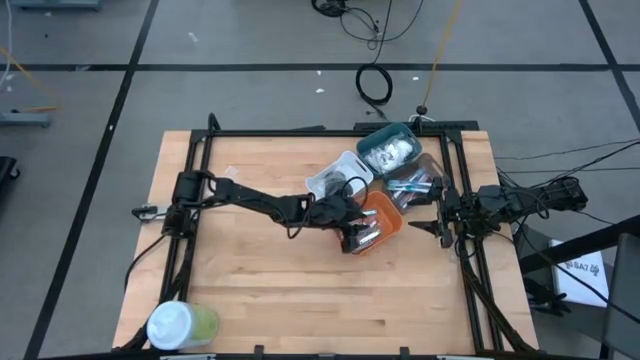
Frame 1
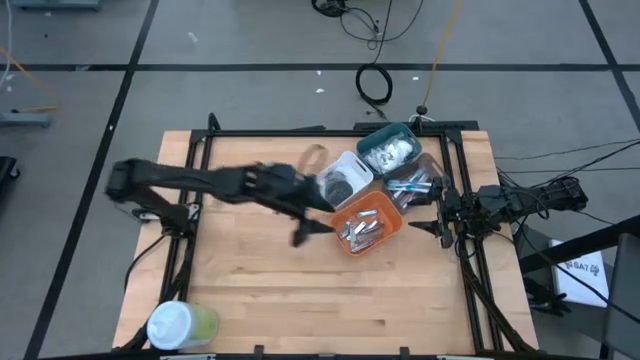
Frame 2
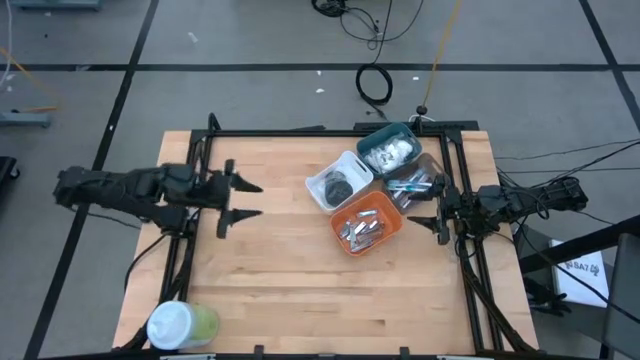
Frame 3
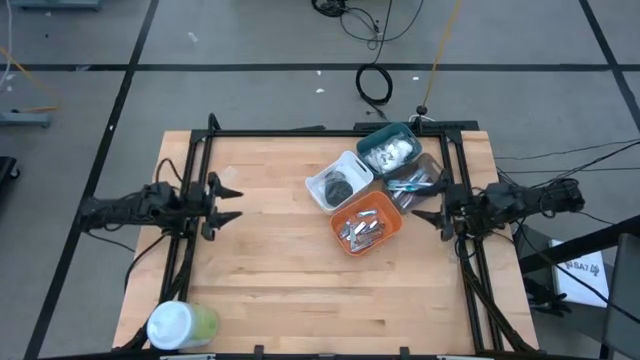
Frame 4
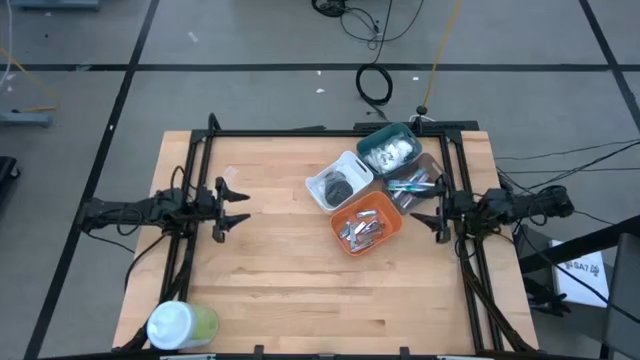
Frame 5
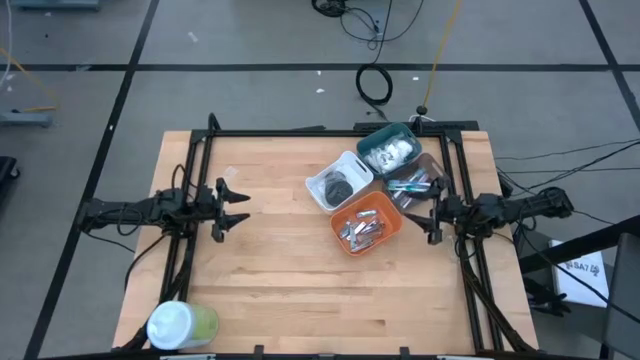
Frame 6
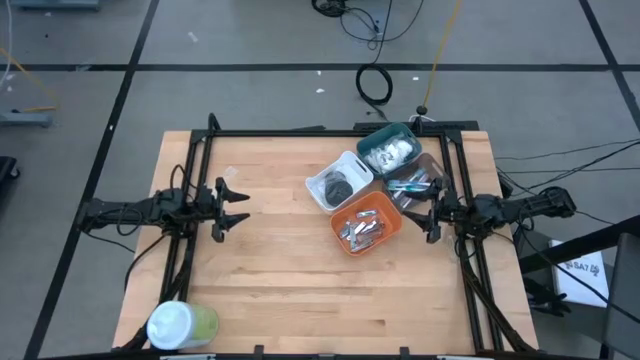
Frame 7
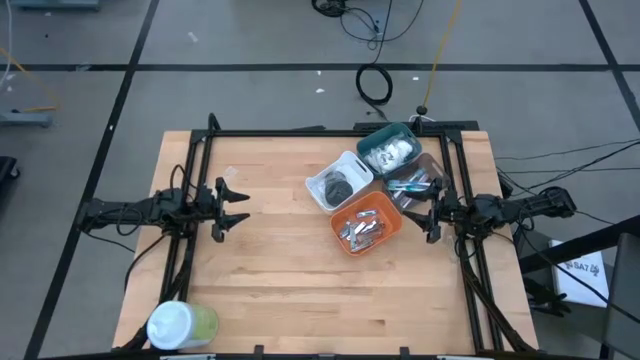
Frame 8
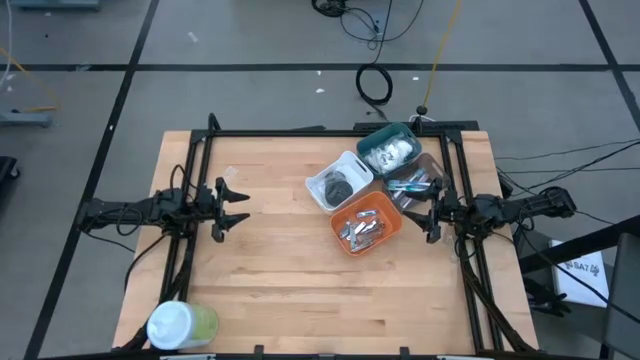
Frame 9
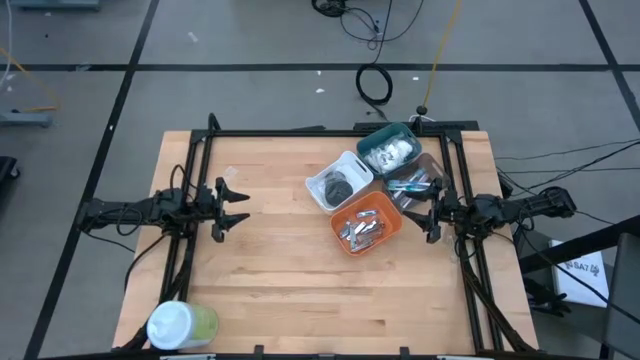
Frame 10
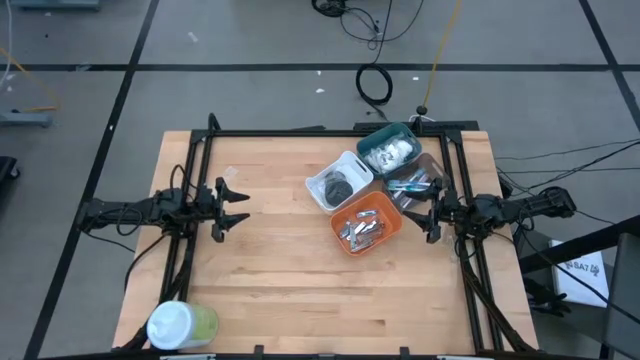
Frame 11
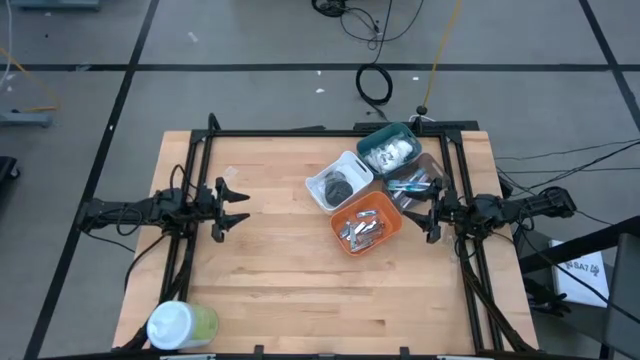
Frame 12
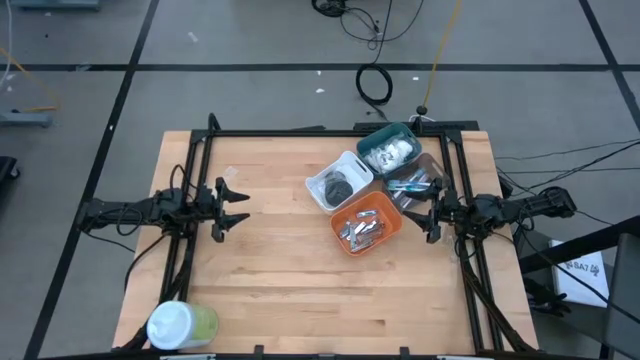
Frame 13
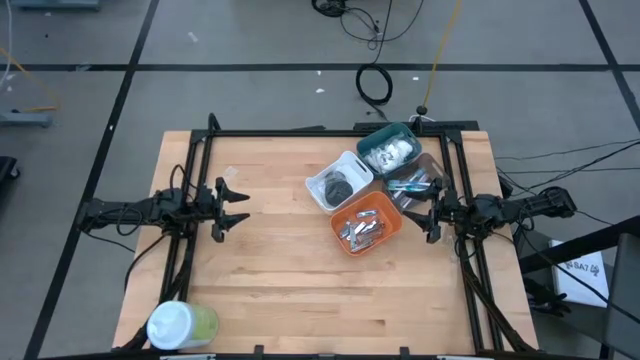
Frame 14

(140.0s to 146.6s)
Task: Pick & Place Travel size toiletries
Return to Home Position

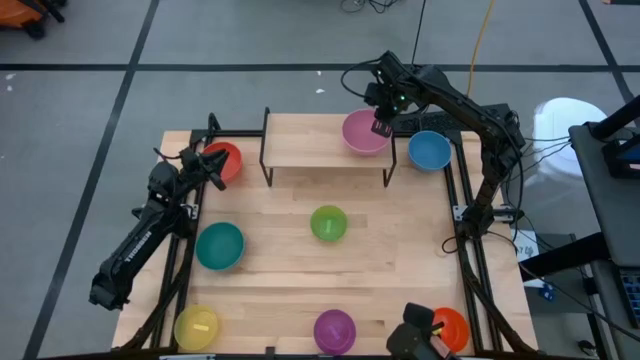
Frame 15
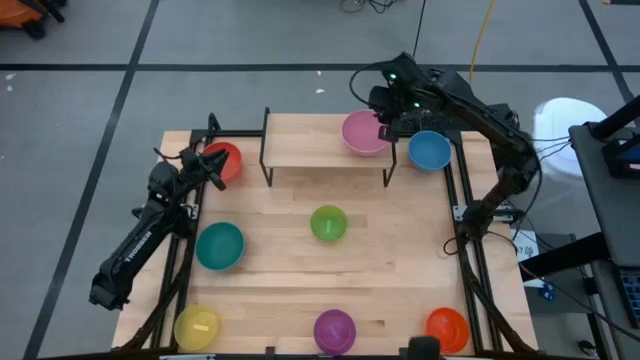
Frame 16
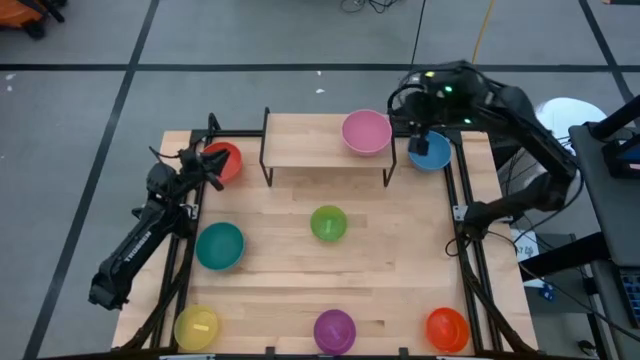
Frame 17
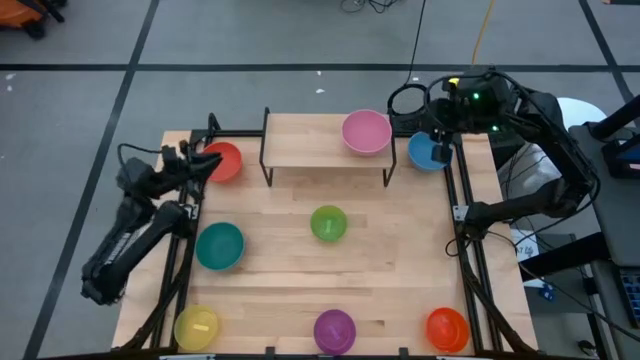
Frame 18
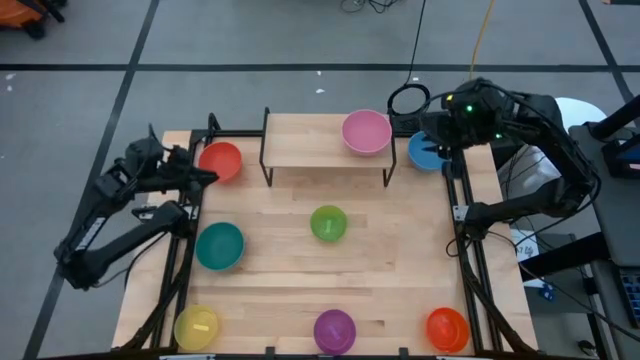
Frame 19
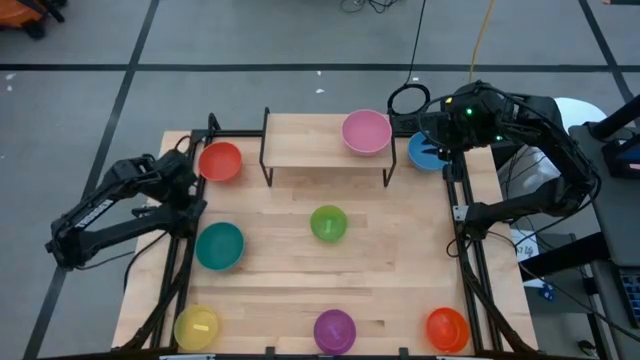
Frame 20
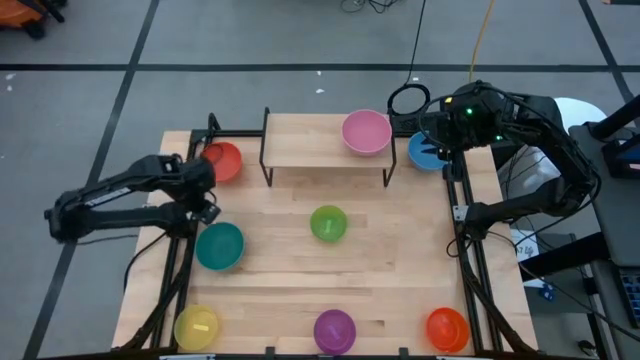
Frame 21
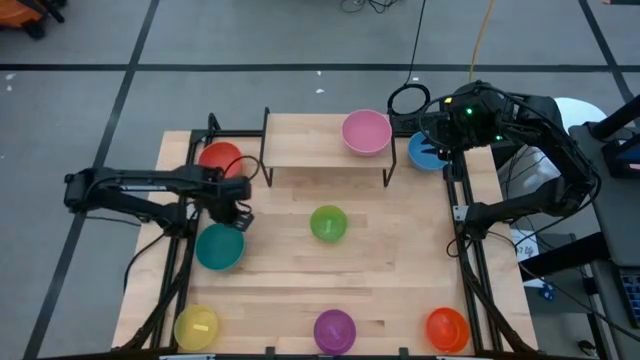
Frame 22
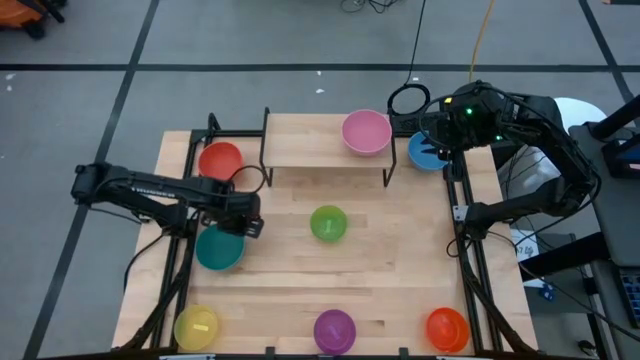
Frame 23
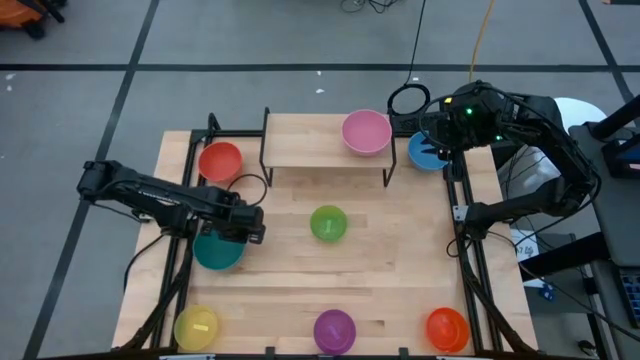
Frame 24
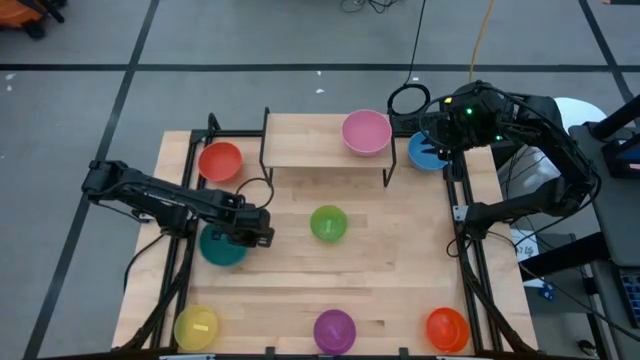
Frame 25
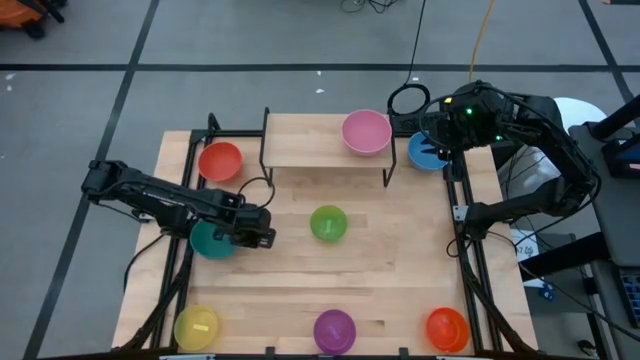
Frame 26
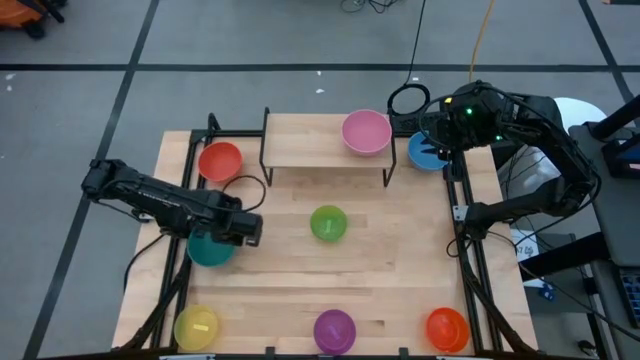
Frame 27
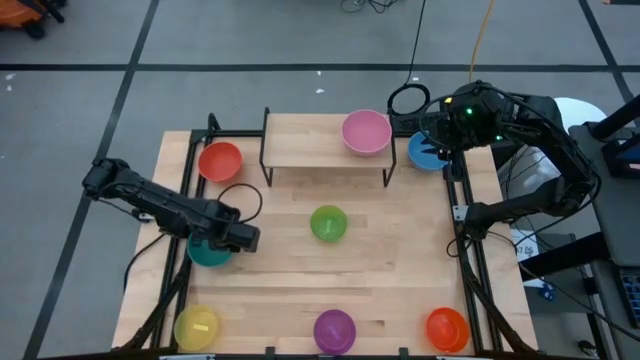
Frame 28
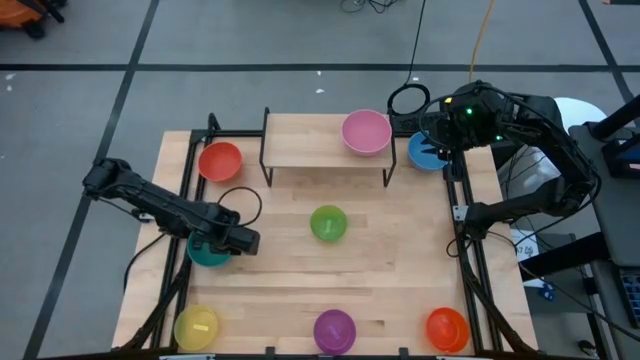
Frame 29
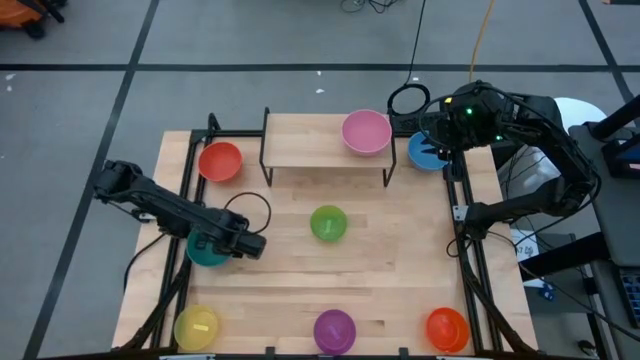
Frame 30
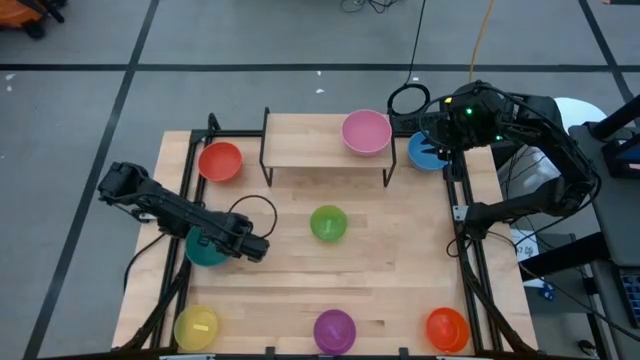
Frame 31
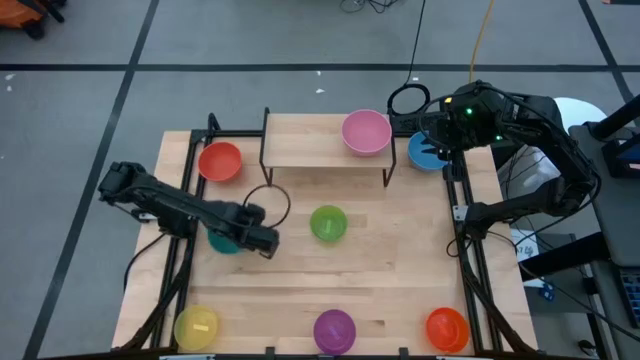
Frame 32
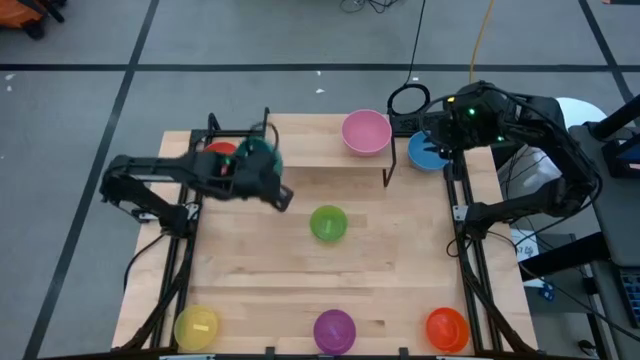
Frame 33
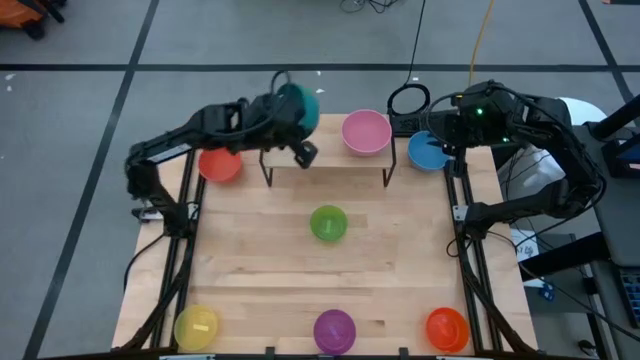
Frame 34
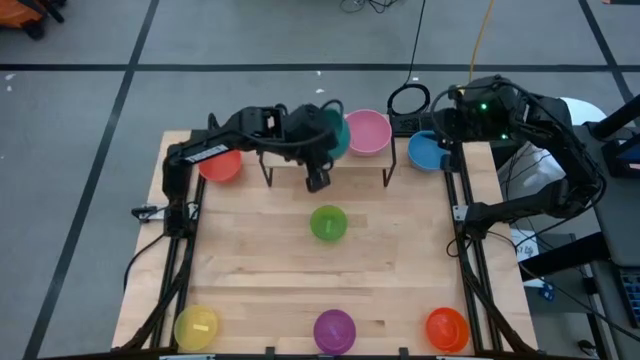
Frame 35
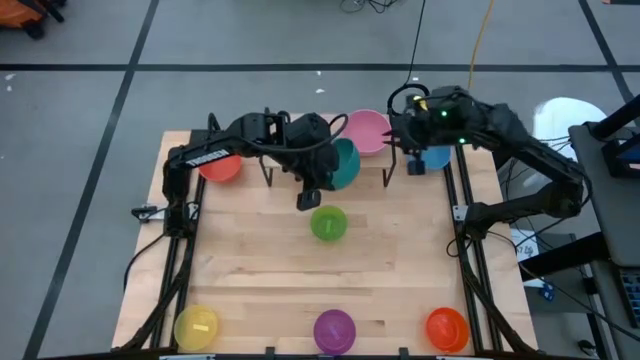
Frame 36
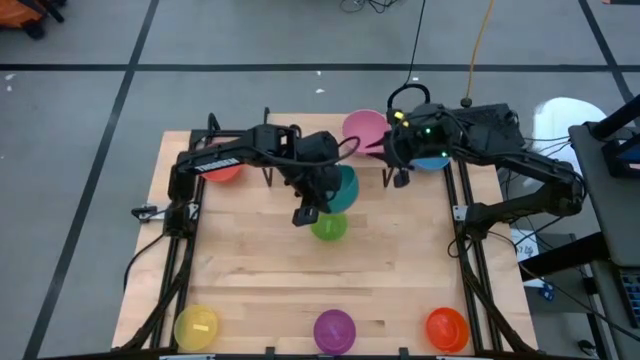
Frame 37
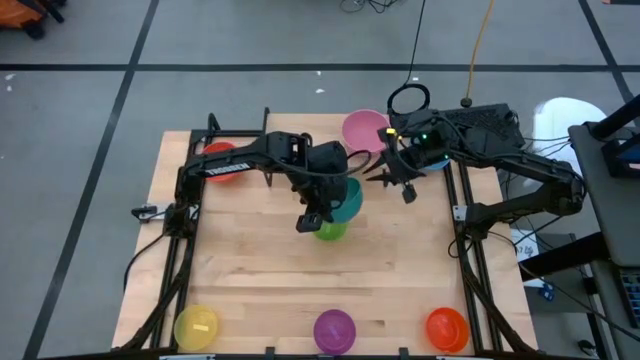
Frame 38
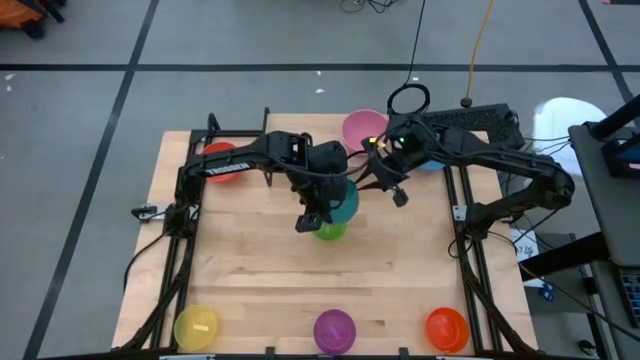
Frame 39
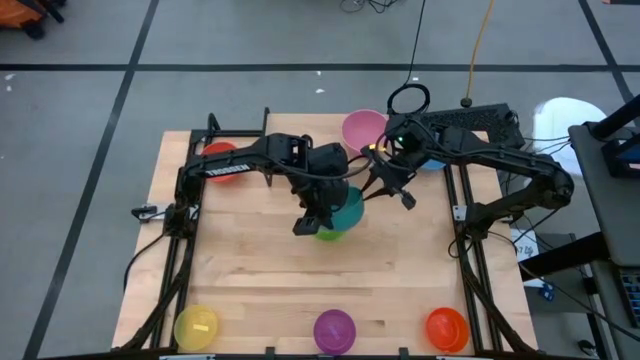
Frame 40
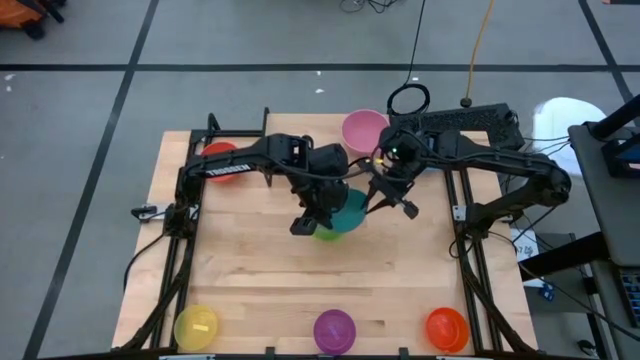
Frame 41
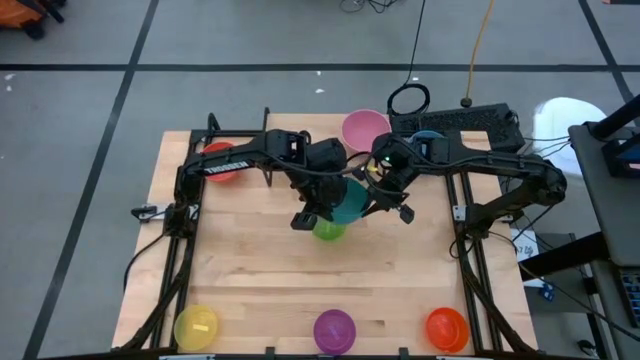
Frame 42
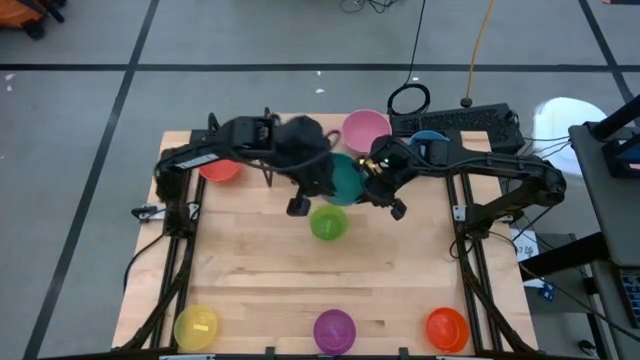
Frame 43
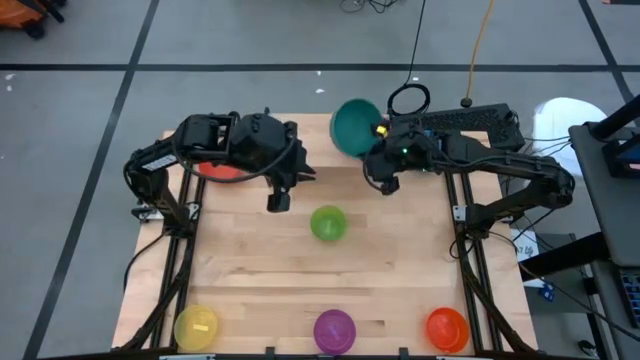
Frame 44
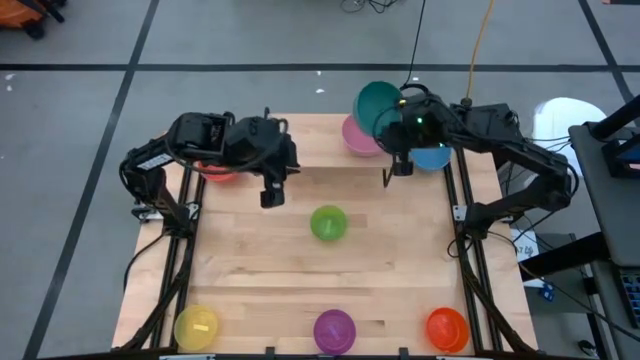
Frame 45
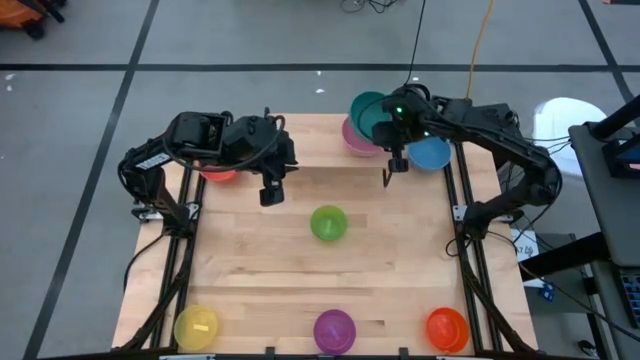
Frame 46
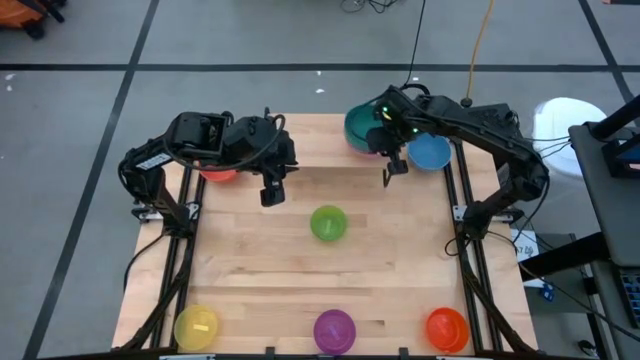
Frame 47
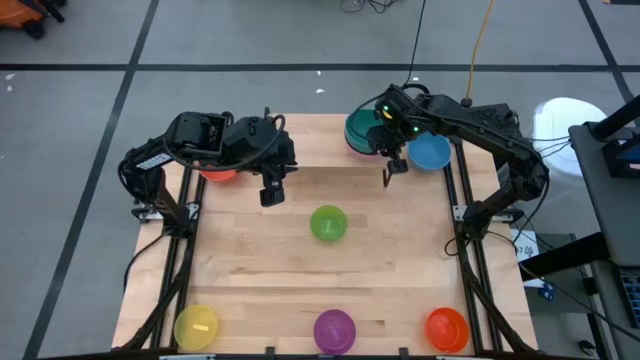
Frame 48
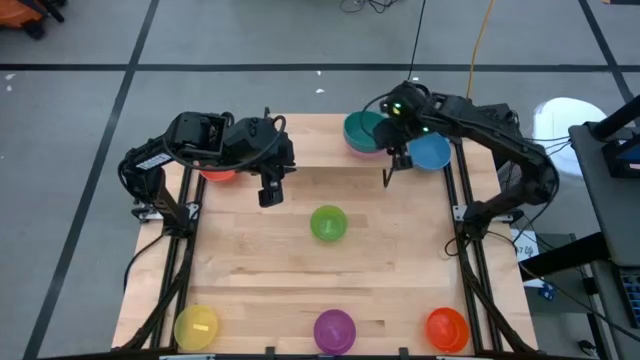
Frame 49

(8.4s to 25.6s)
Task: Place and stack bowls onto a shelf
Stack the dark green bowl on top of the pink bowl on the shelf
